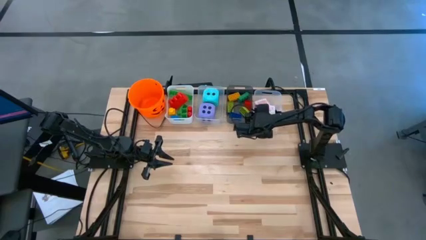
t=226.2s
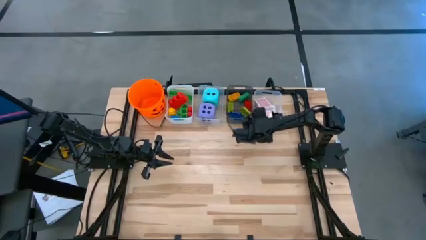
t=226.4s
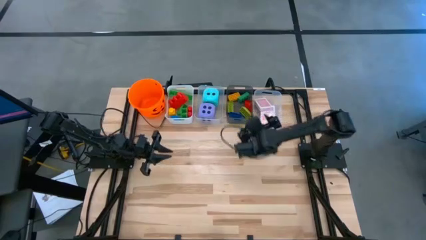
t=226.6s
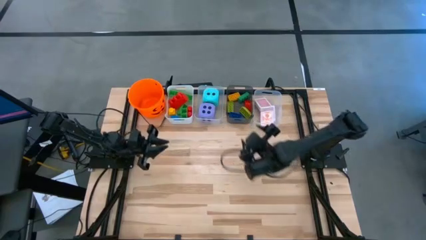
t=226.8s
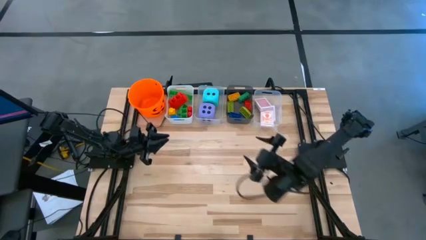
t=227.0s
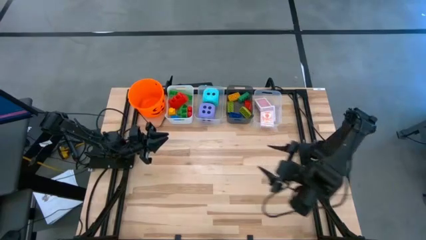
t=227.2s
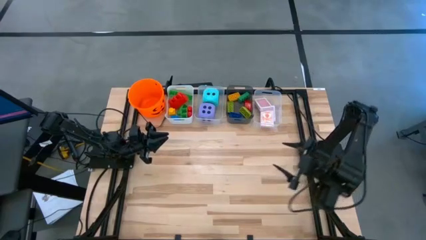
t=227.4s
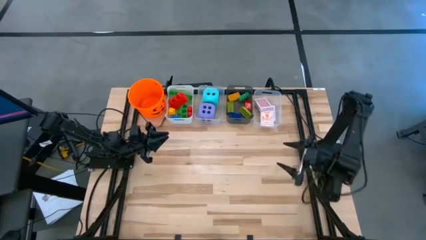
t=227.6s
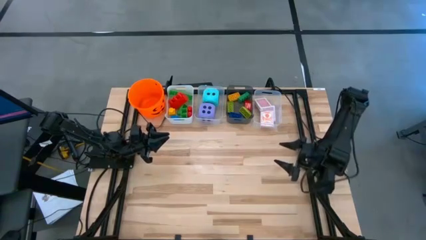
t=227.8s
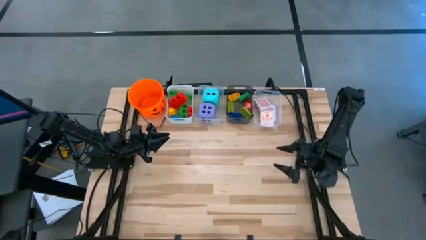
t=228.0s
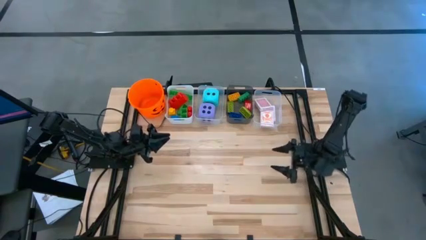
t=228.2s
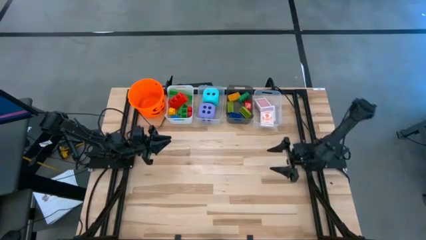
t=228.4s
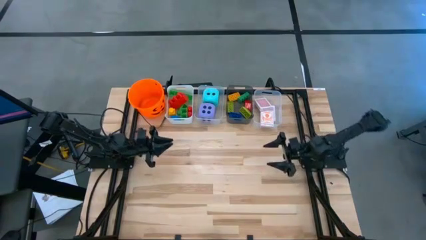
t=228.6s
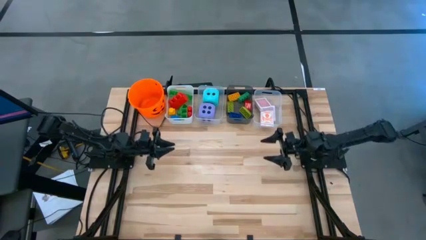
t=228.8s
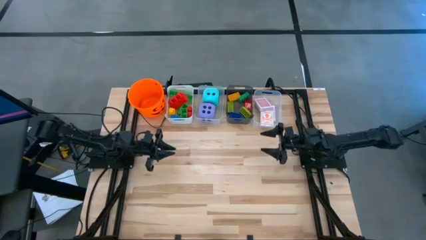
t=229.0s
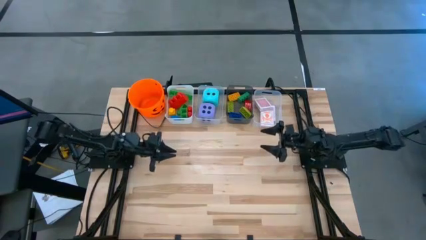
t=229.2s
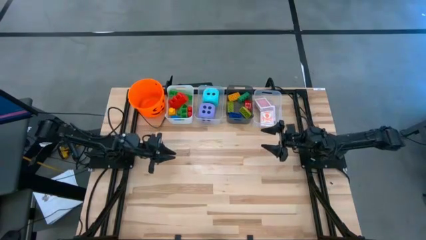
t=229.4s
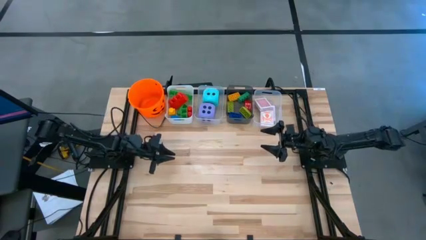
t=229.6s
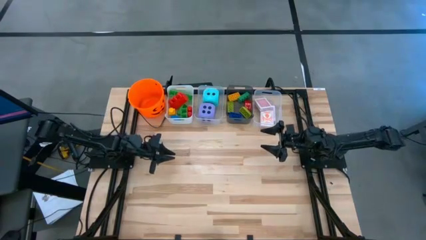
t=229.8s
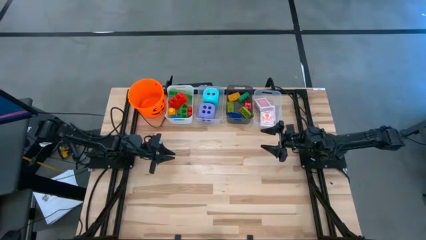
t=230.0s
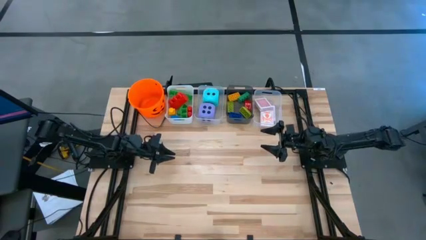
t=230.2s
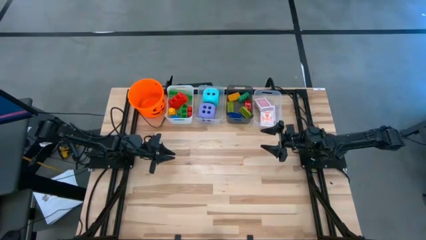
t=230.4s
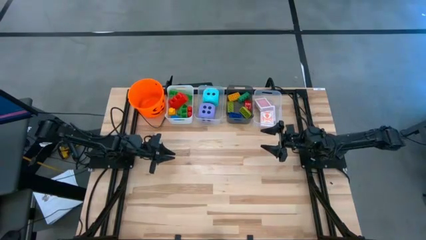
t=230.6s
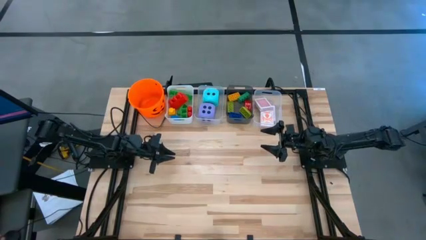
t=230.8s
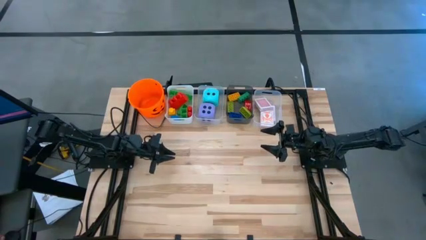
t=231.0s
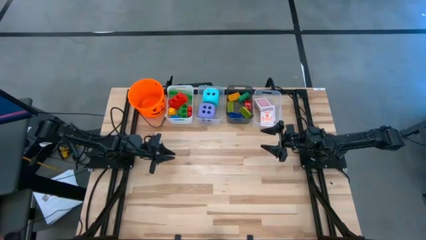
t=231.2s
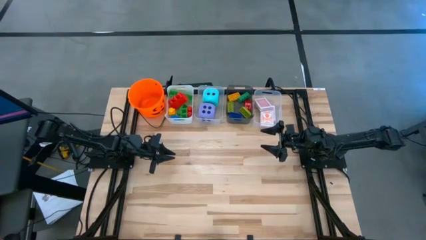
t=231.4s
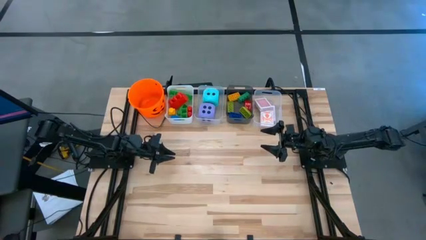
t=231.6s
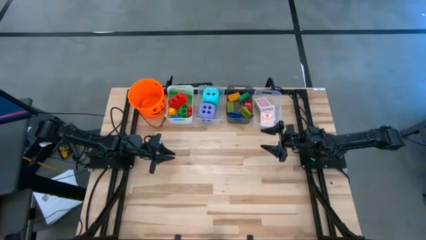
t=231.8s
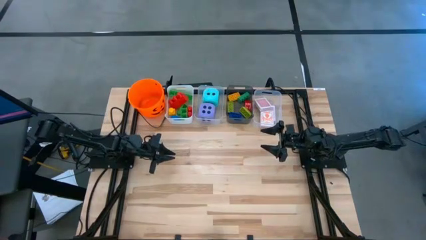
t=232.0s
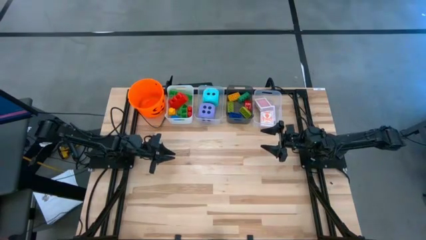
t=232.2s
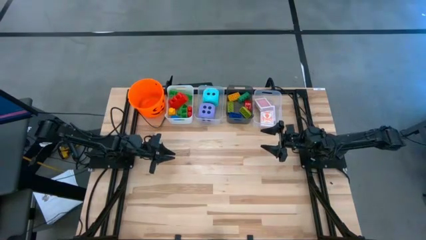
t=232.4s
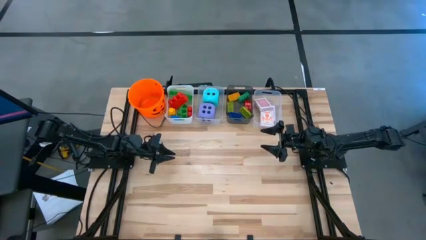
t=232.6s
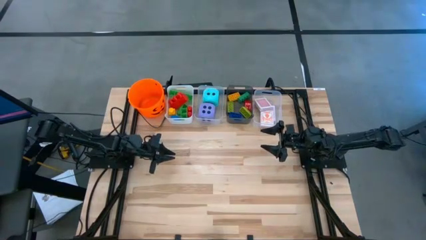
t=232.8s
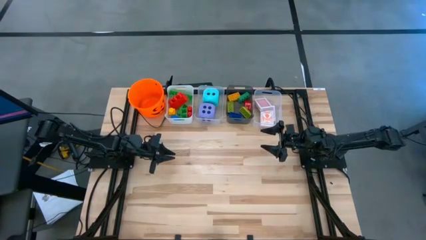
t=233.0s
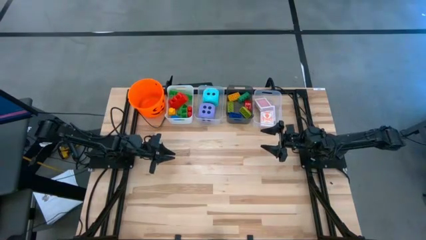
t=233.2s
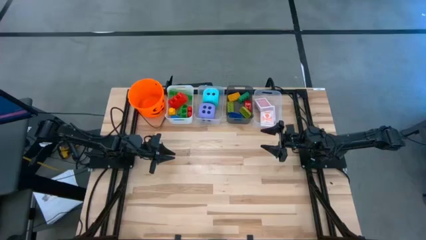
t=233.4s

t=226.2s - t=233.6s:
Task: Pick & Place Toys
Return to Home Position

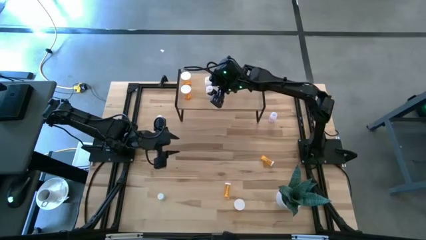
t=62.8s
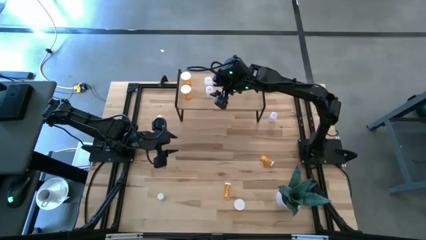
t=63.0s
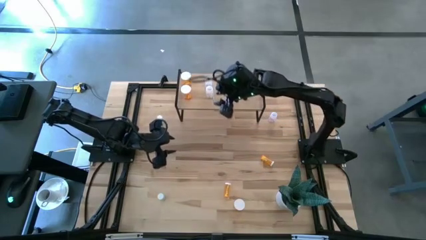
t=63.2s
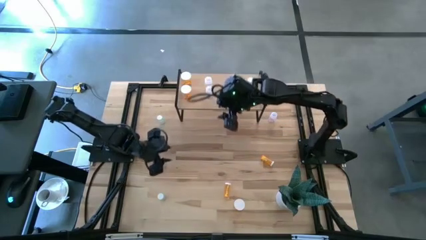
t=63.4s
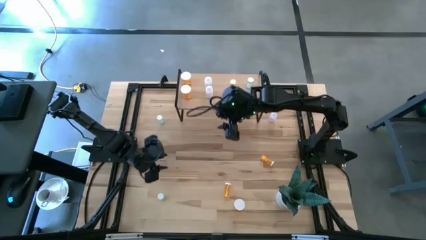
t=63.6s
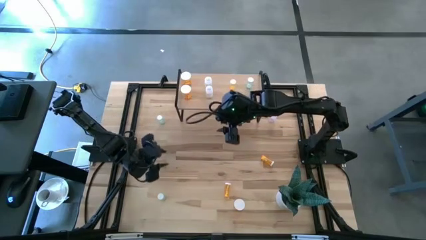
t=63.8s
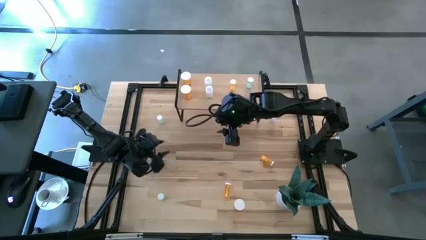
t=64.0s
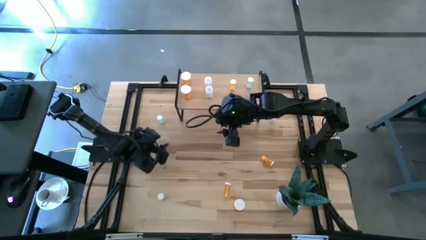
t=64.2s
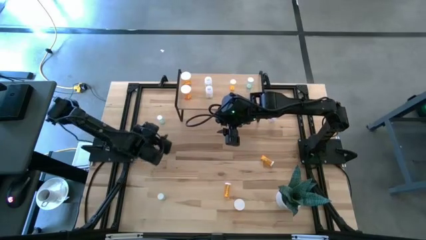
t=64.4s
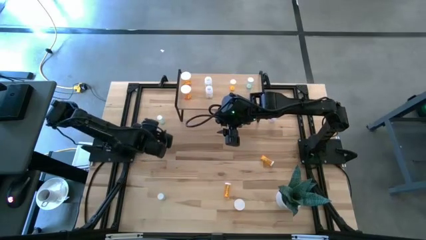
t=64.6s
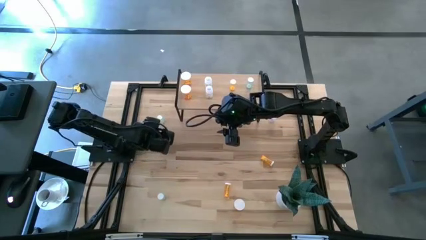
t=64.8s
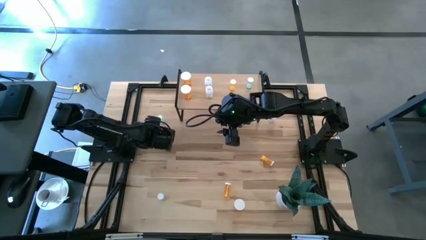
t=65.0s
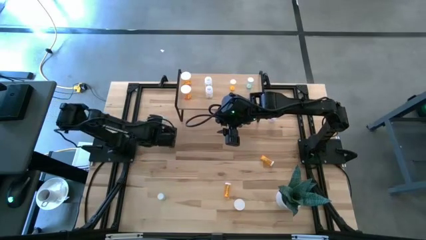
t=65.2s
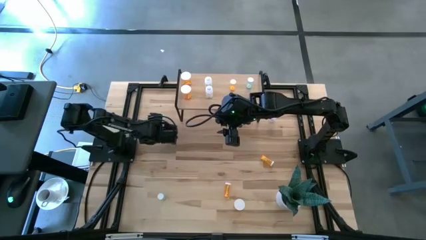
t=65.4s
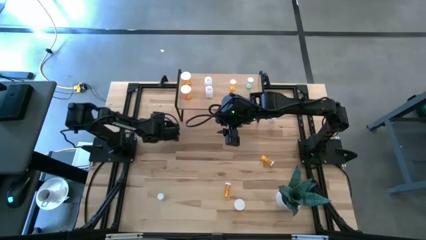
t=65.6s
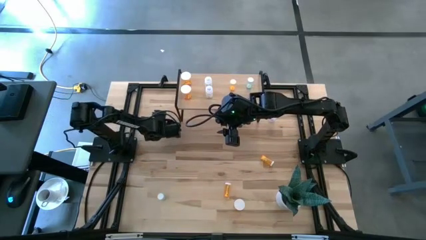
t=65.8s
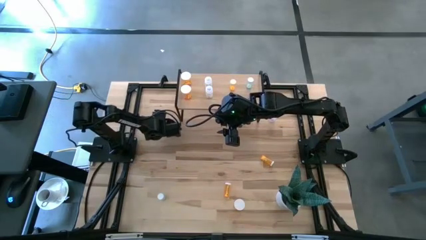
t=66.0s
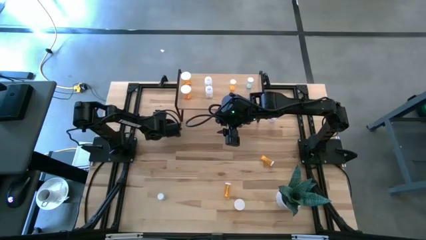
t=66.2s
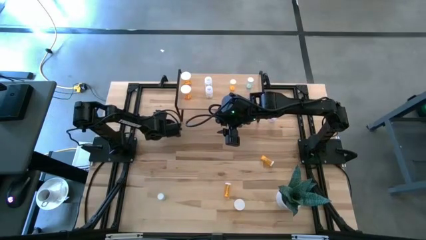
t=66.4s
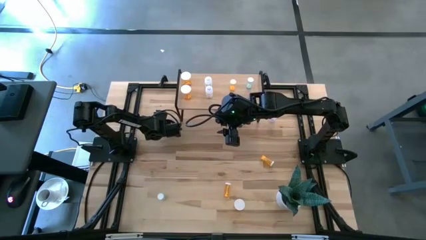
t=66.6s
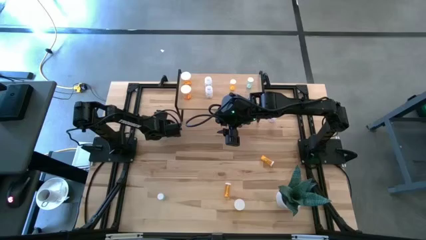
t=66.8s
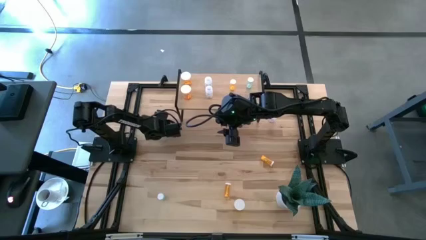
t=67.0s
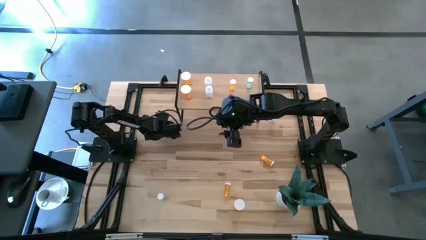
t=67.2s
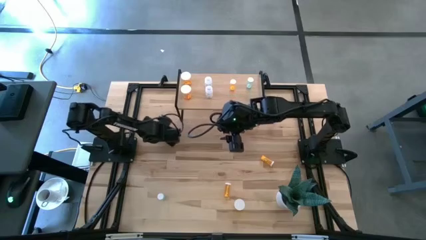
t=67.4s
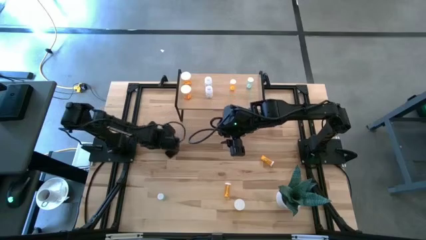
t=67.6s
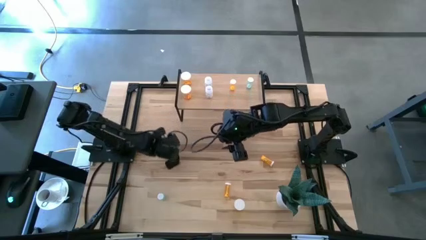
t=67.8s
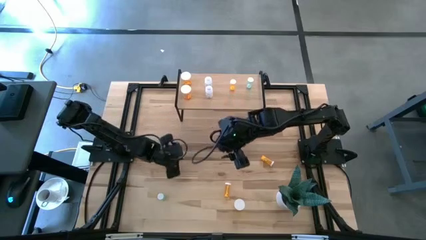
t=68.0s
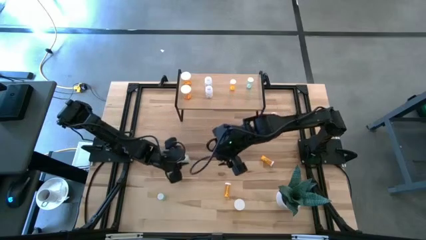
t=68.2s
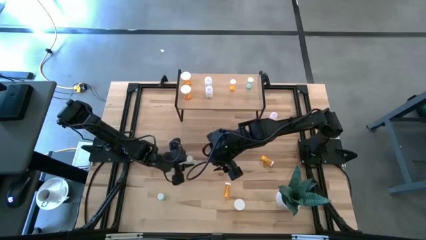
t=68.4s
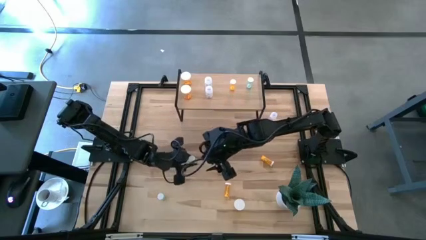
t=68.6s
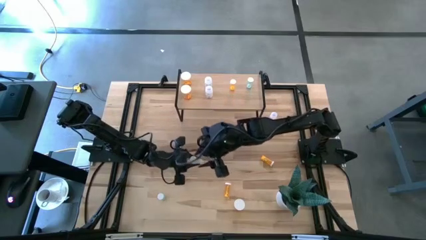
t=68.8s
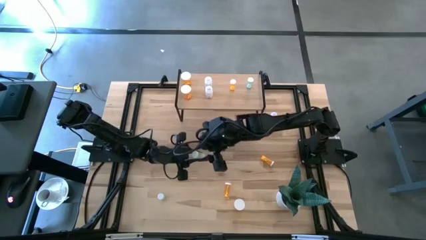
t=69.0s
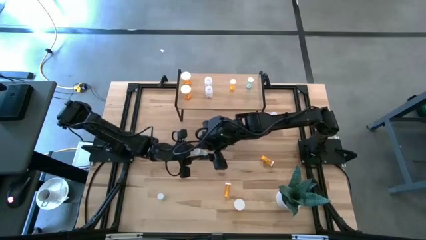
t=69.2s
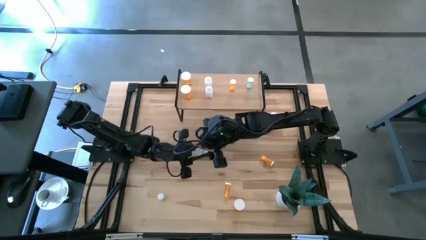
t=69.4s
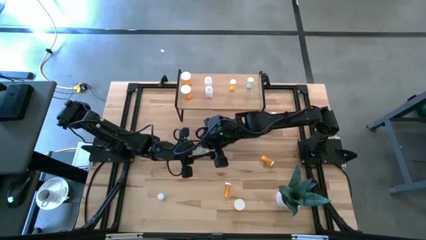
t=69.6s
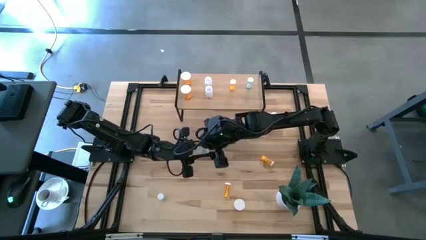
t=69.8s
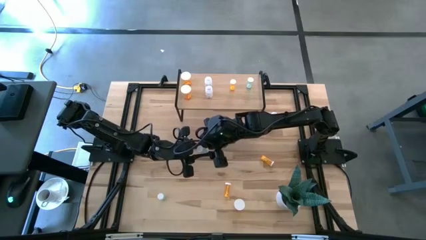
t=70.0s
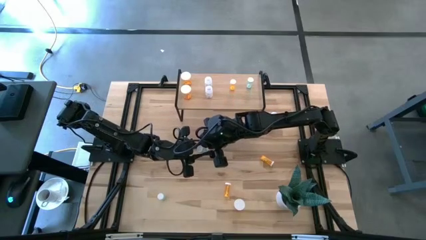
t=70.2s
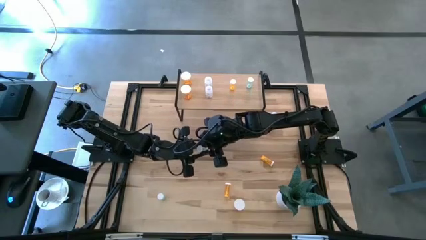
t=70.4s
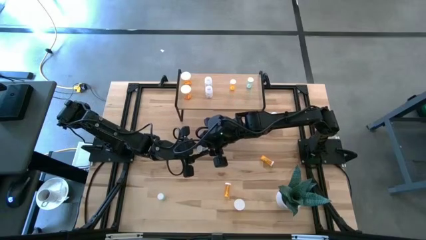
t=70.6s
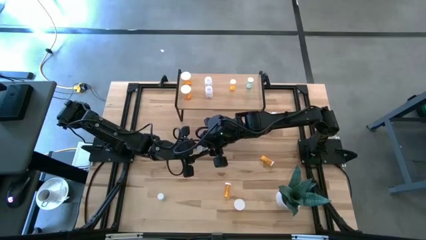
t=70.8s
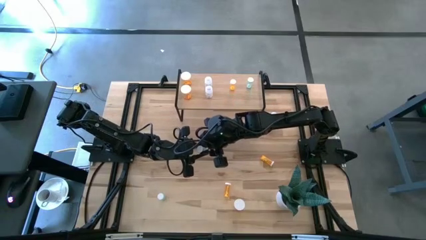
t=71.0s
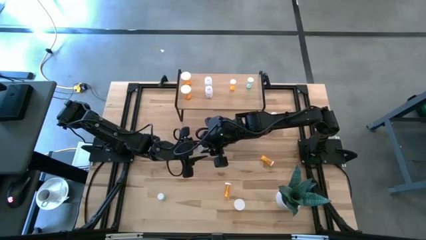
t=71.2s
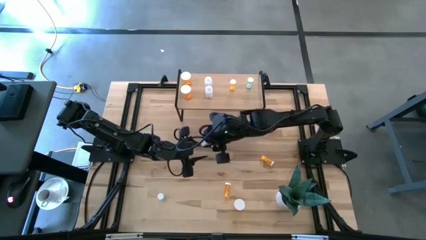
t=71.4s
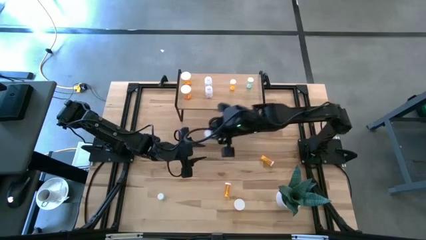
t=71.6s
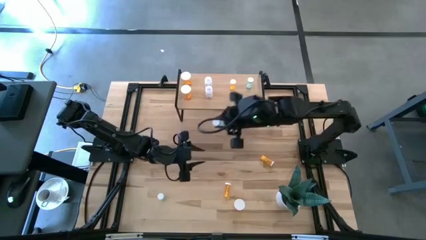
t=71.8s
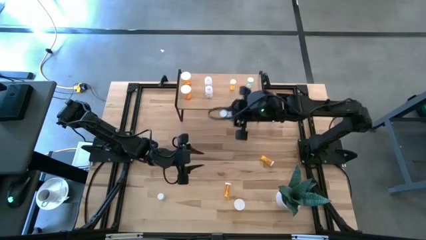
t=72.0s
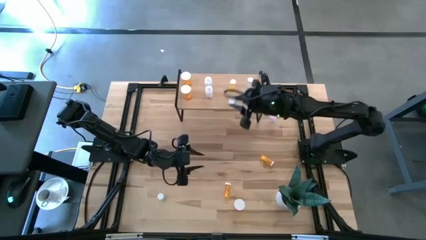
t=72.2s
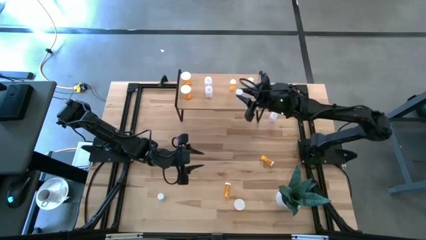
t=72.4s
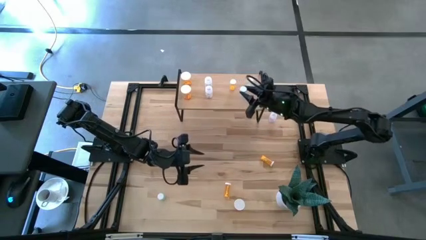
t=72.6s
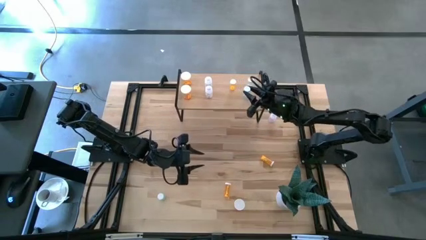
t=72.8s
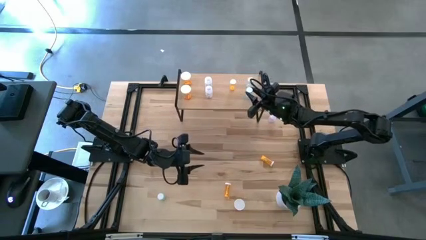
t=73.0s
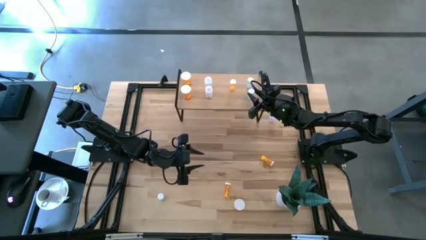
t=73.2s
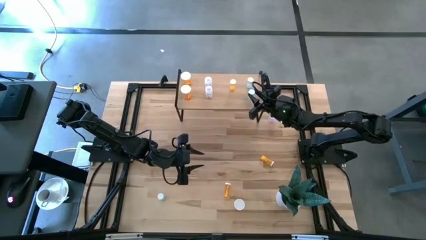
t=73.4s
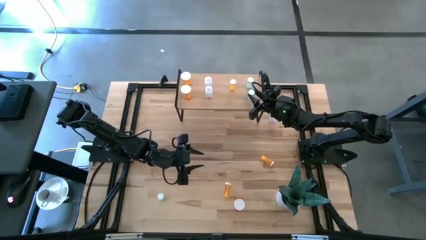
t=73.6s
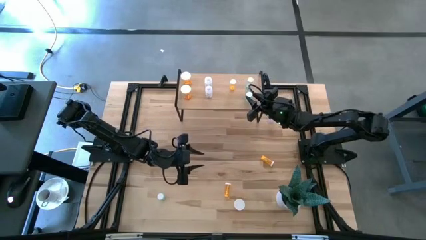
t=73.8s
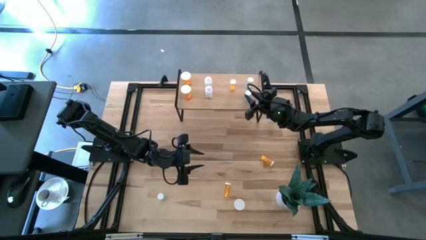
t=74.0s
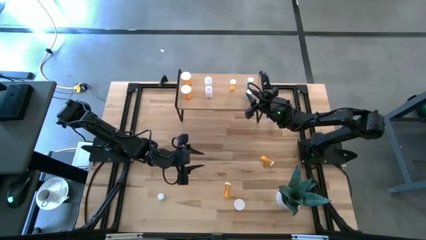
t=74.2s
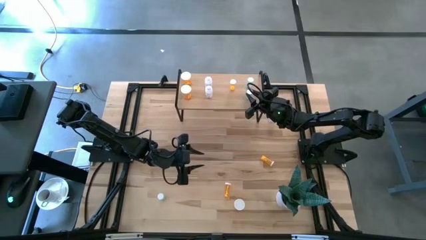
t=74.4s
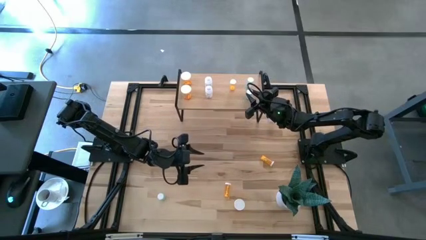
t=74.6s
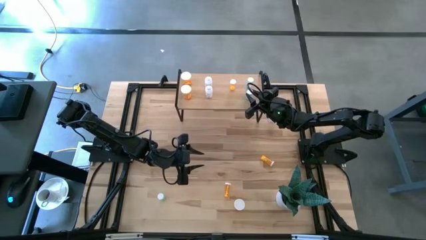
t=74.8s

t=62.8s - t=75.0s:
Task: Pick and place medicine bottles onto shelf by color
Put the top left dark green pill bottle on the shelf aligned with the other transparent pill bottle
